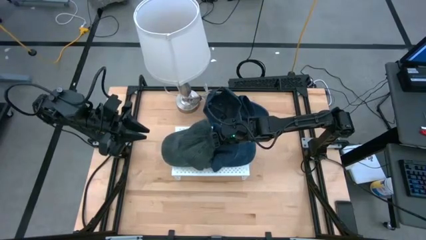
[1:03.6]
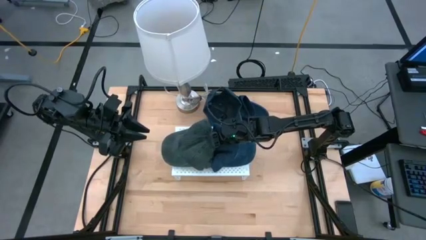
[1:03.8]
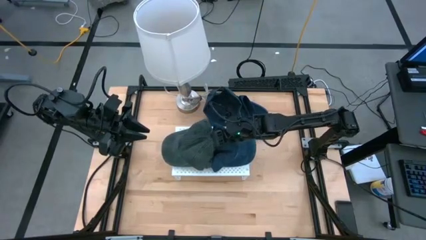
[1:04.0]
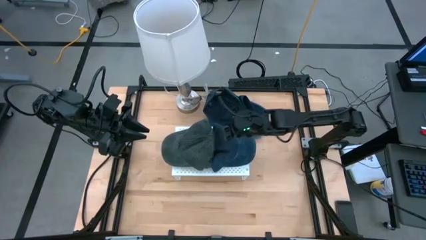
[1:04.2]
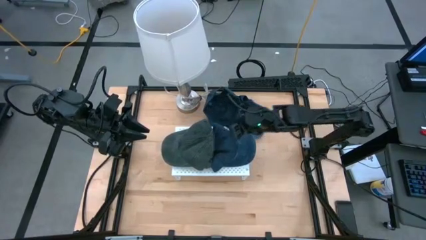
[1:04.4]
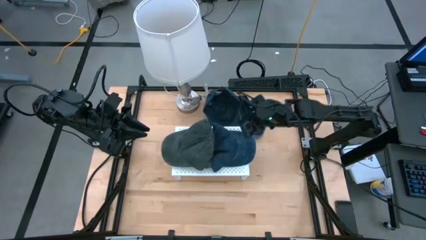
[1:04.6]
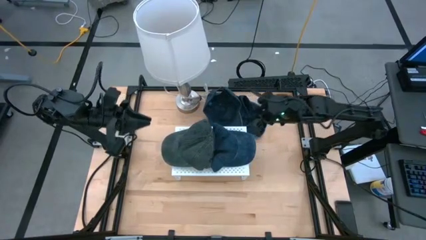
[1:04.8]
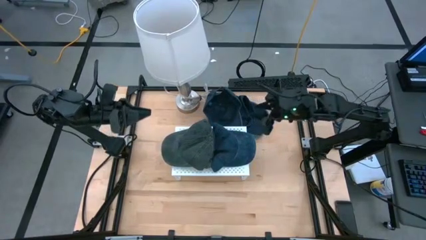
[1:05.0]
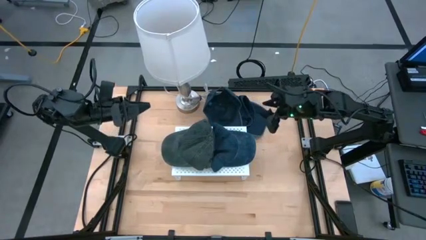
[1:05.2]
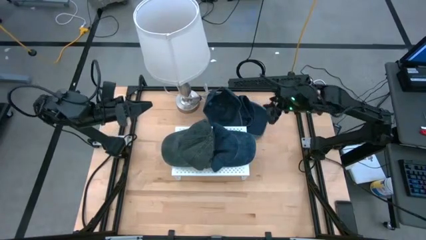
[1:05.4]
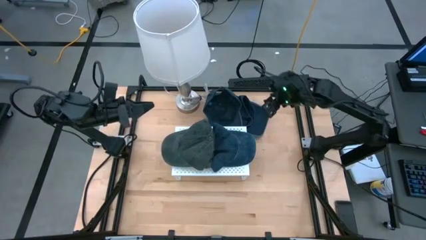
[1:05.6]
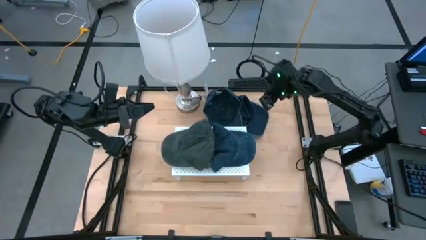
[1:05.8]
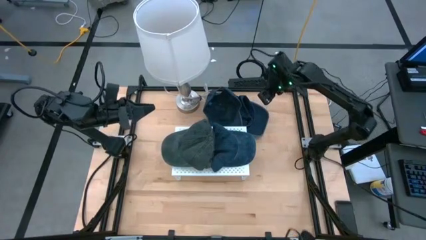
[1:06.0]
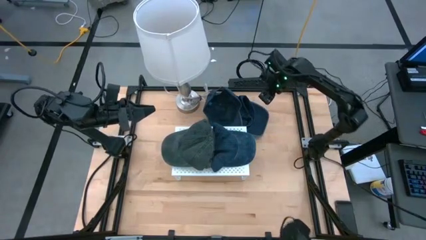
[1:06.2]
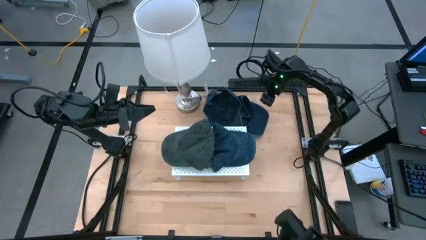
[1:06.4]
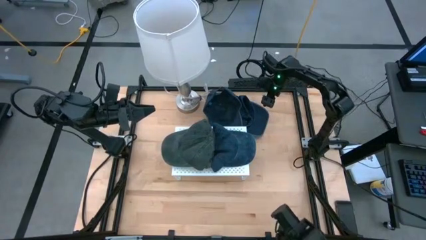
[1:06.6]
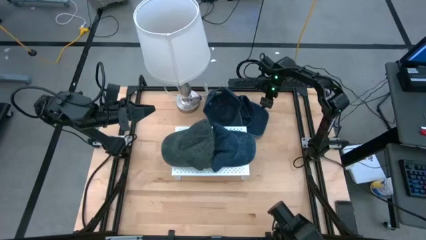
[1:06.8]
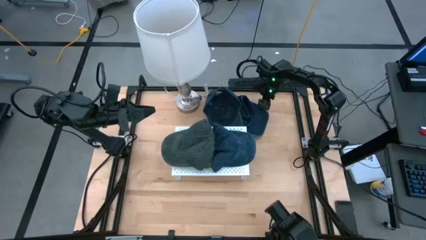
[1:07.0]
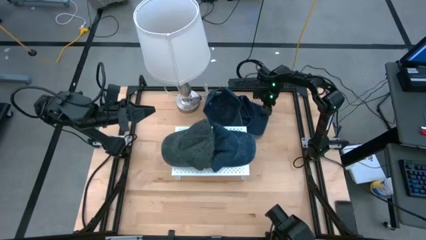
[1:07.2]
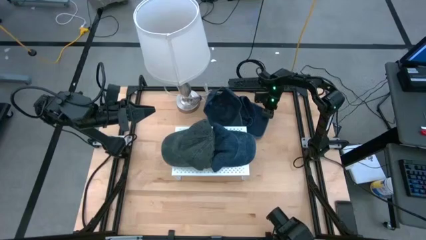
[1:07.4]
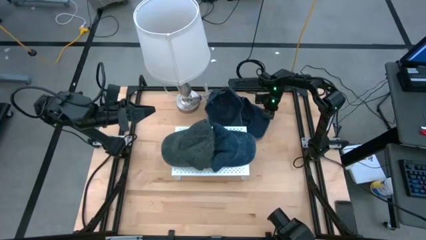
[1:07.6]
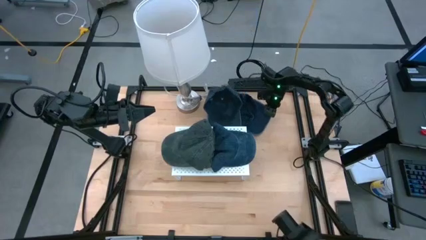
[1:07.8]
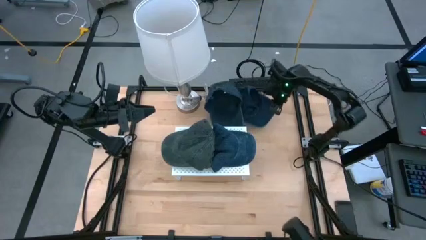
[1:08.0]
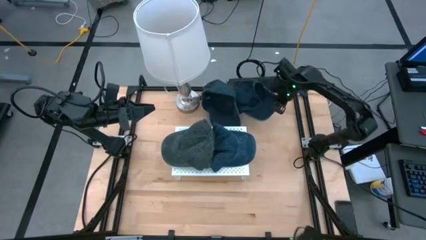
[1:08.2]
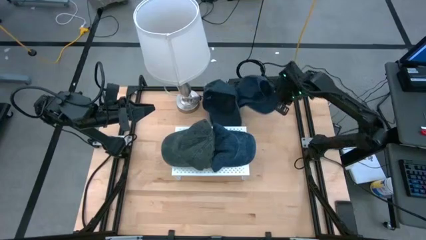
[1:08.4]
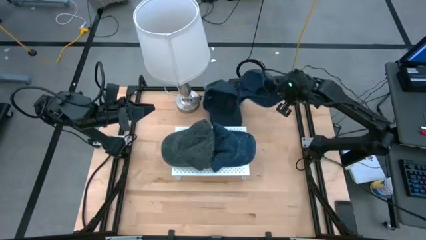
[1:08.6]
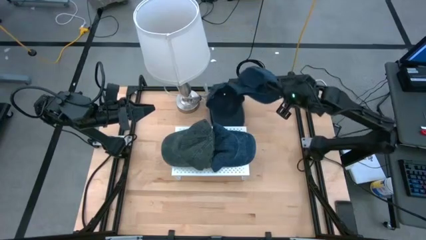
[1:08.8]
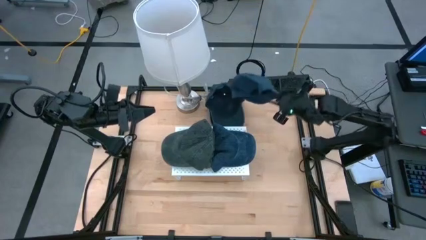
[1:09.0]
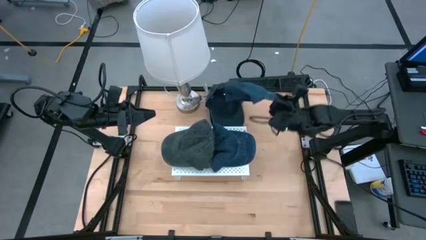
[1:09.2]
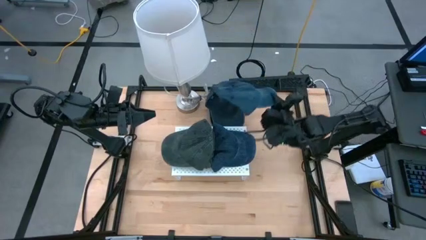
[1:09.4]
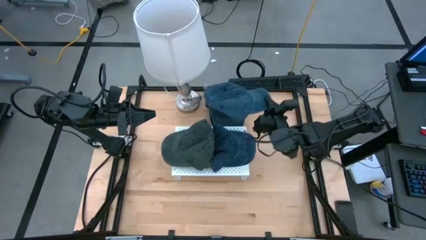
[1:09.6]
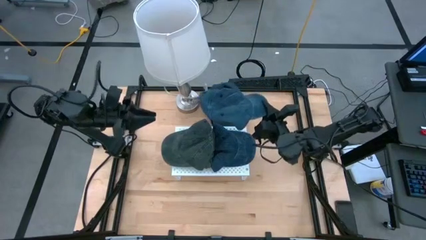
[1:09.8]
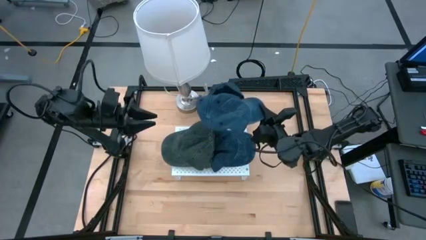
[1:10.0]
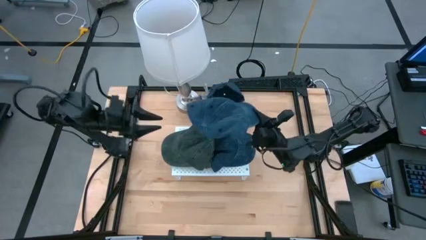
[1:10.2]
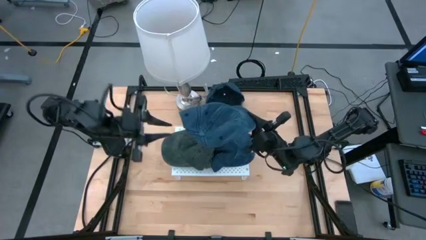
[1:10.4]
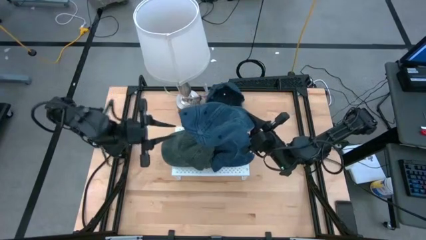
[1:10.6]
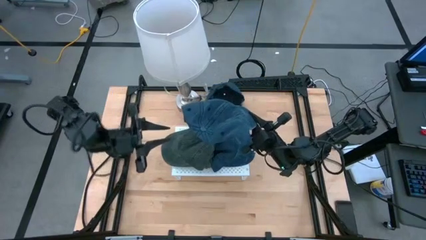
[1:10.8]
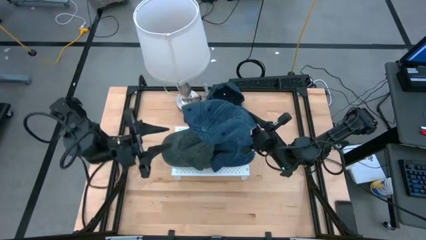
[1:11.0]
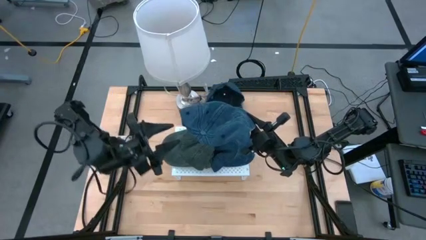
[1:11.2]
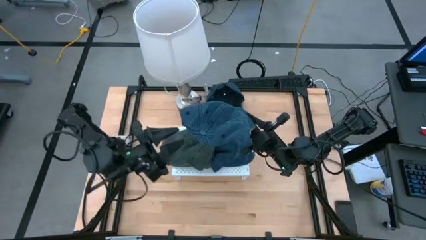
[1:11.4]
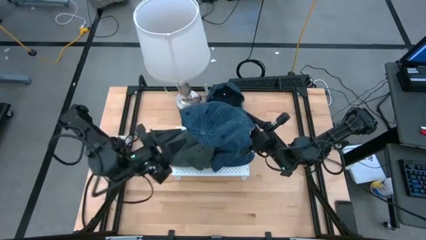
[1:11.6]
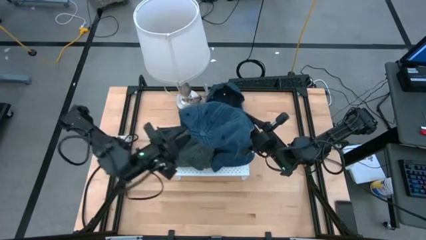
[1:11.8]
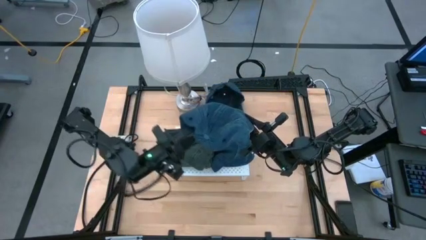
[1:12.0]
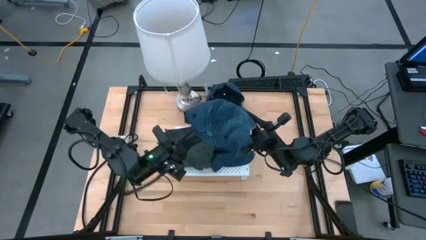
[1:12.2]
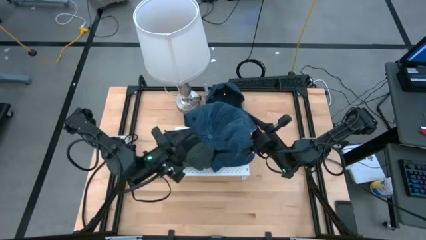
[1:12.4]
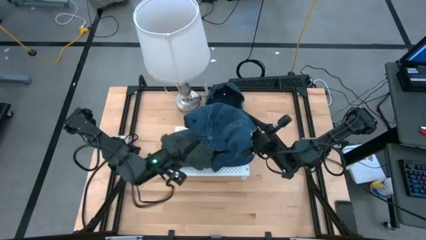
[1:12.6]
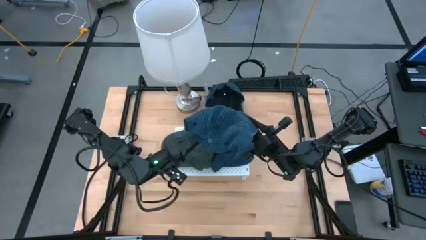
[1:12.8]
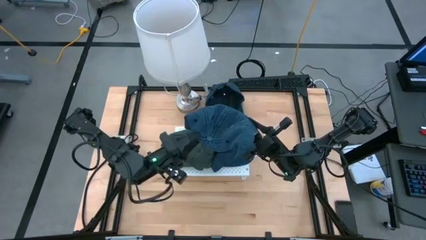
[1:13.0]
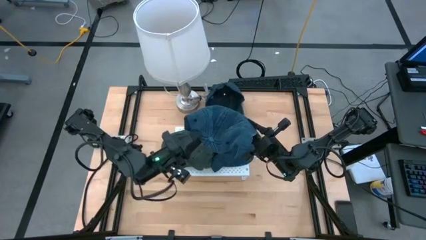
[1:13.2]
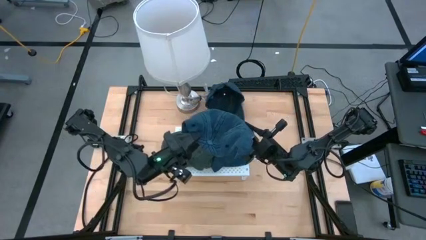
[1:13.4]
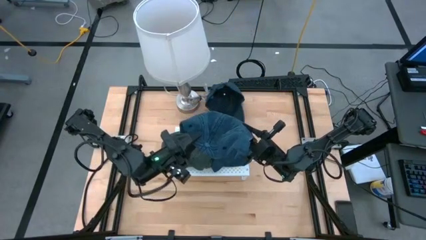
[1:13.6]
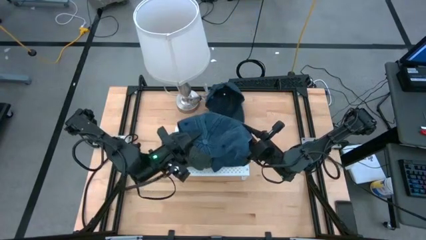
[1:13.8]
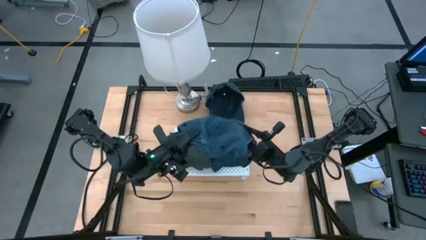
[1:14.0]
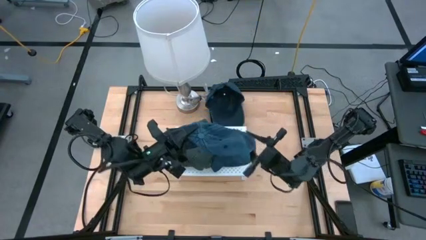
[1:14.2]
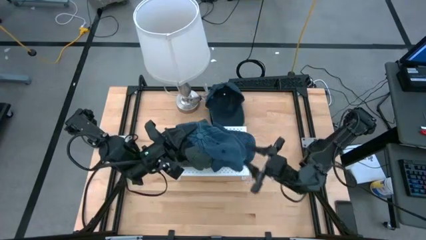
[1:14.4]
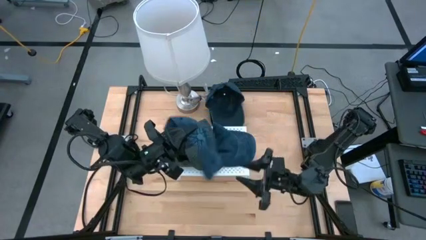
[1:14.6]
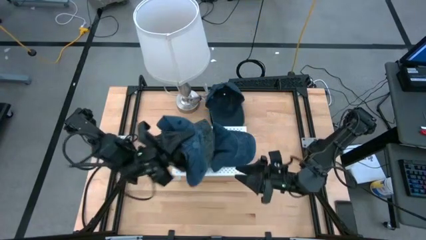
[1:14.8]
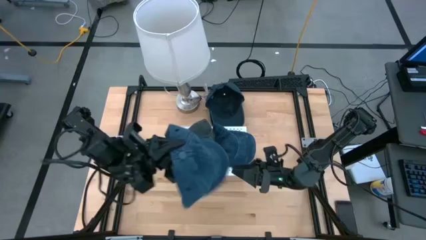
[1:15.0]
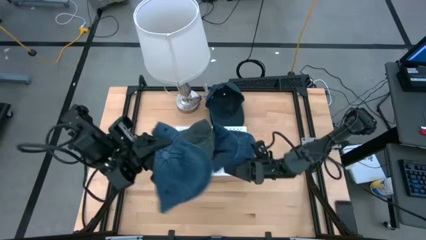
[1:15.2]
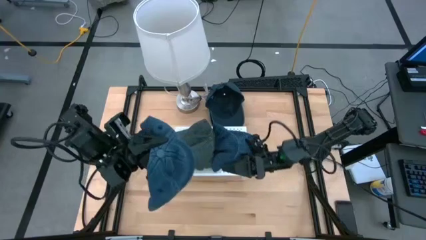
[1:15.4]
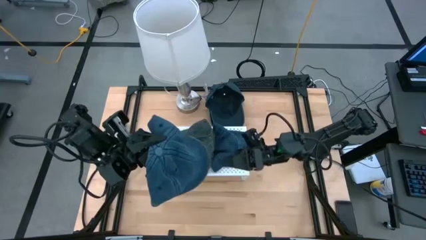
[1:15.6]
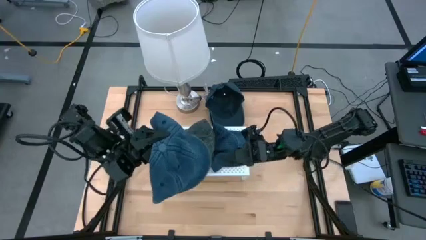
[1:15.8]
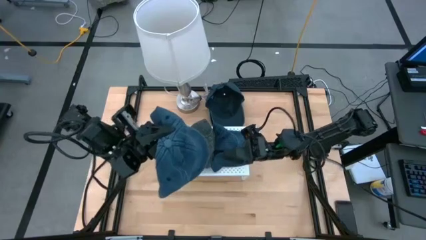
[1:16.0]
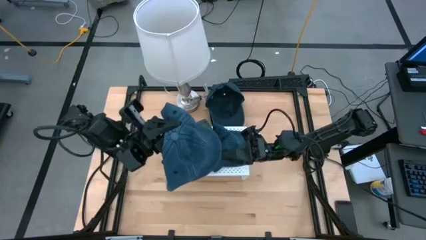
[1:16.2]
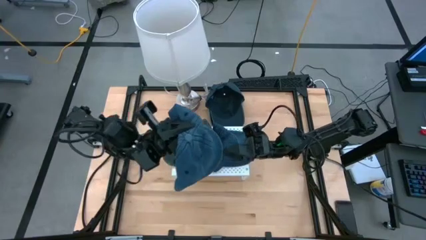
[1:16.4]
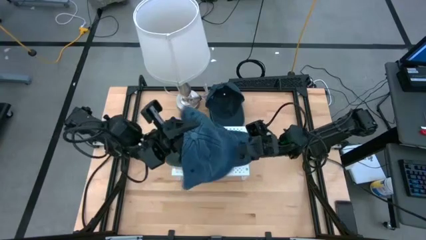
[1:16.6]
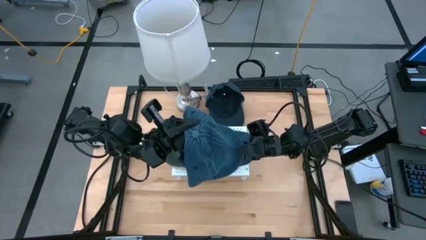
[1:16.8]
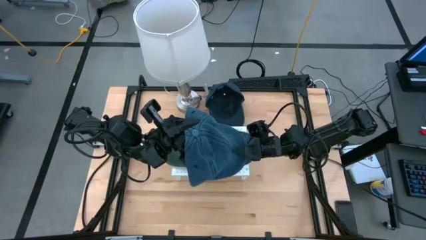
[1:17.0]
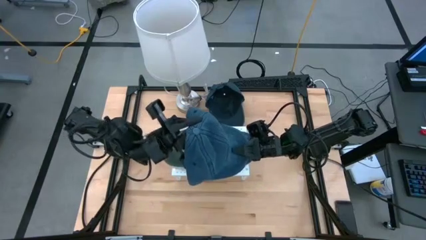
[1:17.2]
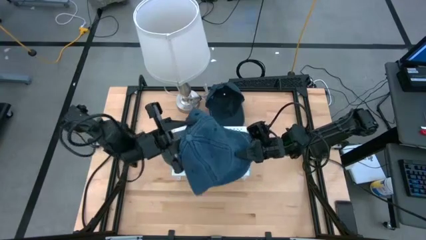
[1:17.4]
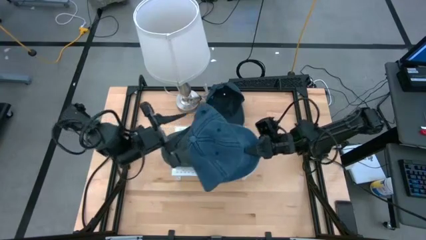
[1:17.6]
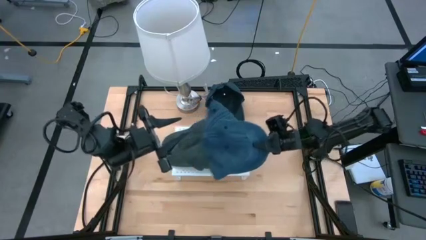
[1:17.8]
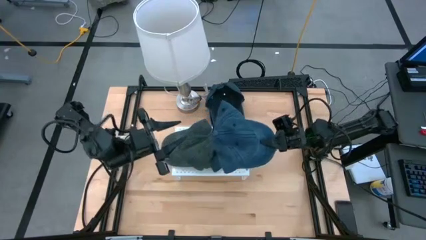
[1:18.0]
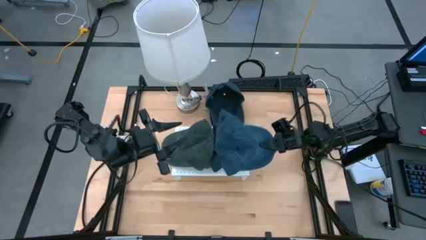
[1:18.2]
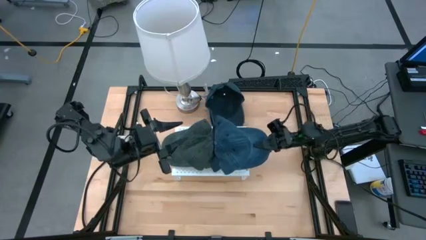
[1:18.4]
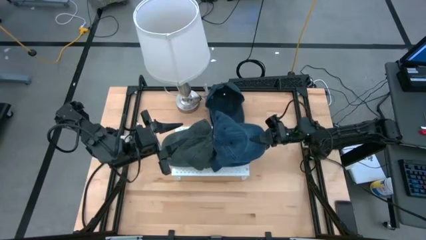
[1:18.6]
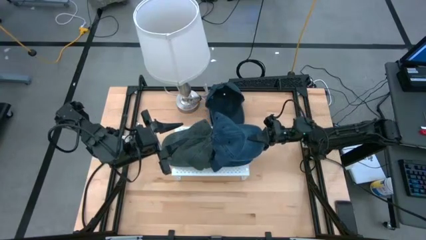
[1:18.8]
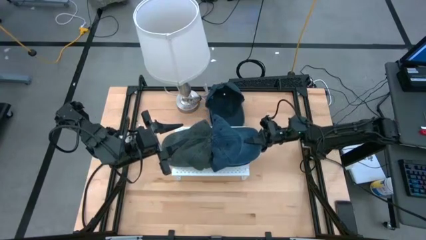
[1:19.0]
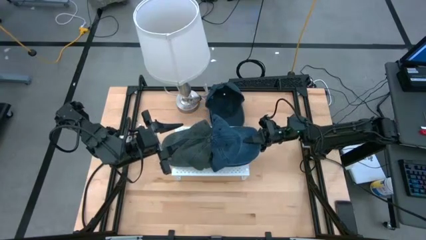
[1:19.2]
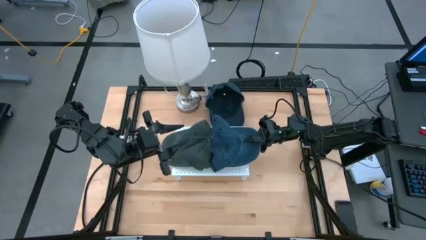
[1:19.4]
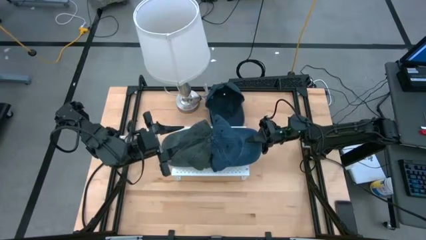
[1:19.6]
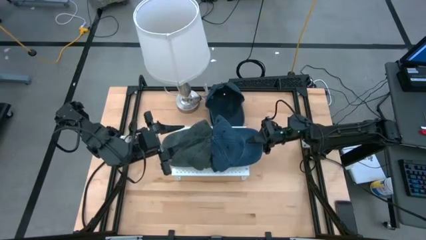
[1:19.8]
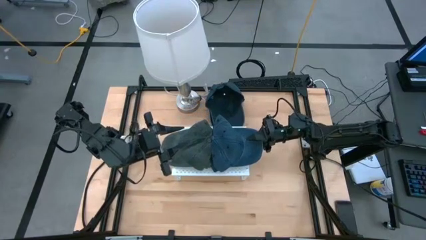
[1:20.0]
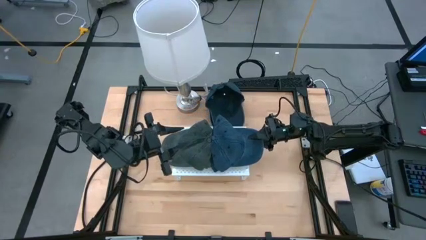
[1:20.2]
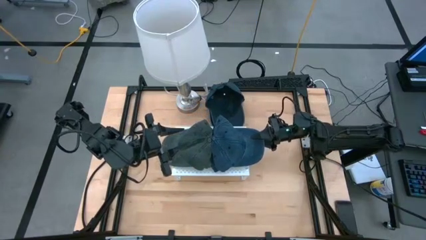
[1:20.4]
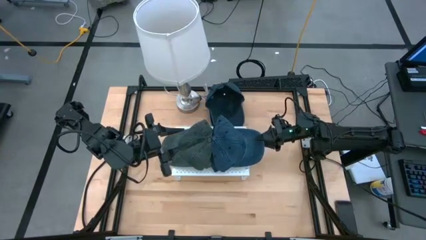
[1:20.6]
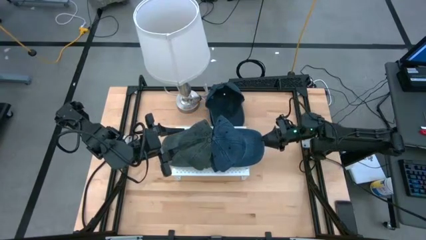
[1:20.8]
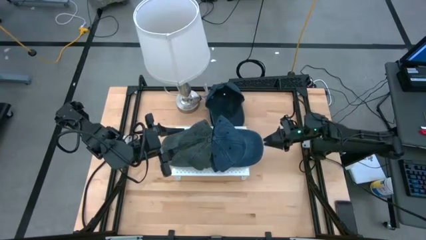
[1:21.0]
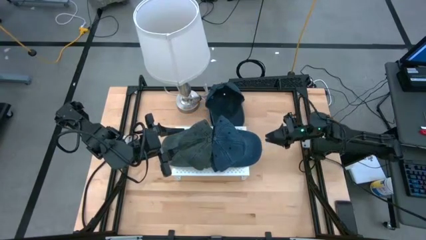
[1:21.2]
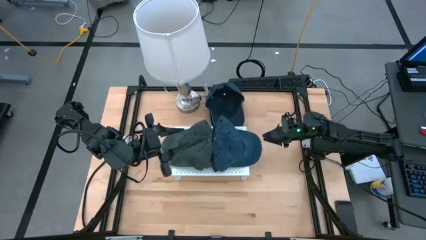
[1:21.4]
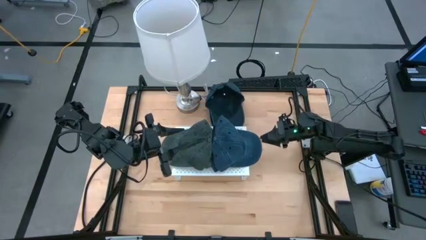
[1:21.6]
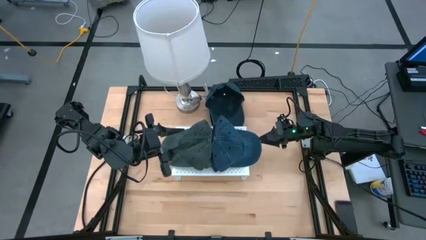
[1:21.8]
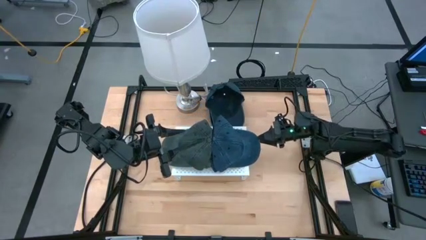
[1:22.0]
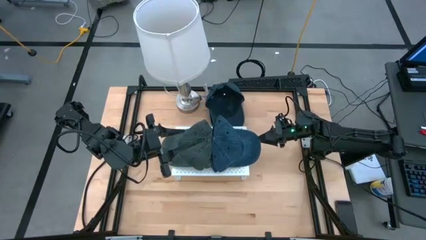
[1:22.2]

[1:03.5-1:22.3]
Task: Pick & Place hat
Stack the right blue cap on top of the other blue cap on the shelf
